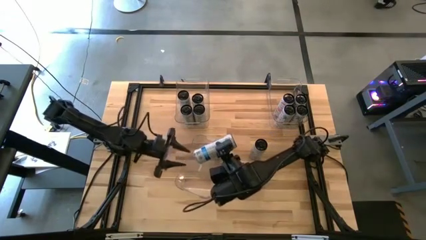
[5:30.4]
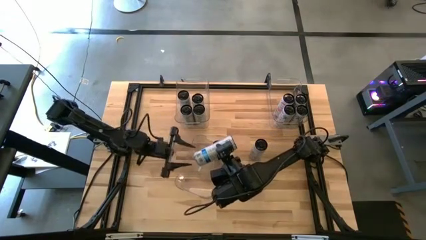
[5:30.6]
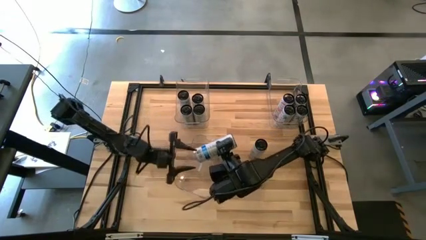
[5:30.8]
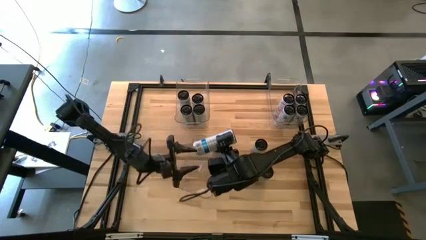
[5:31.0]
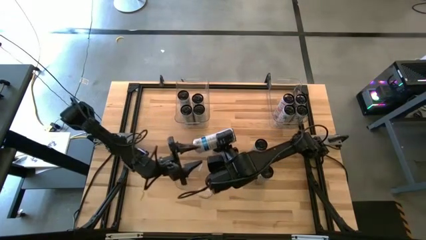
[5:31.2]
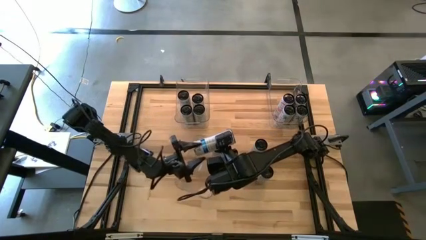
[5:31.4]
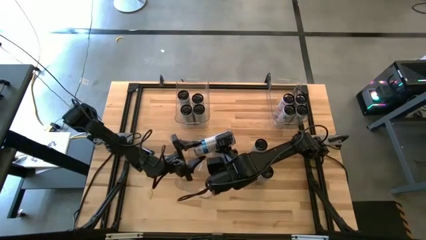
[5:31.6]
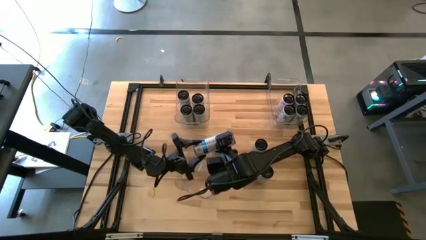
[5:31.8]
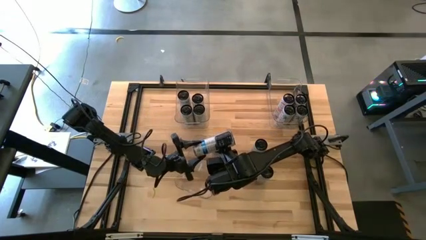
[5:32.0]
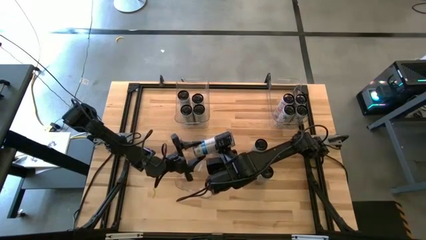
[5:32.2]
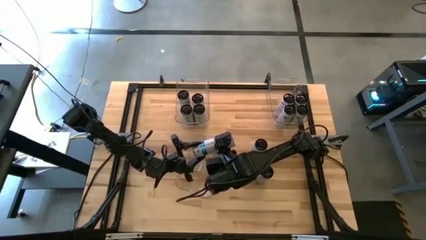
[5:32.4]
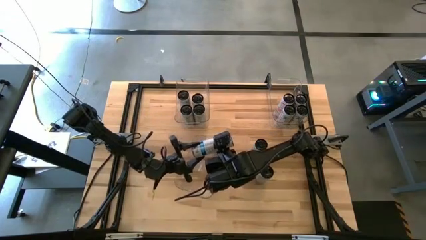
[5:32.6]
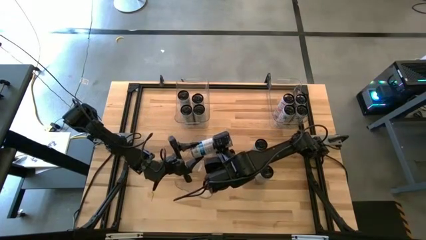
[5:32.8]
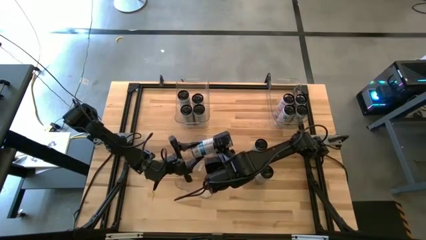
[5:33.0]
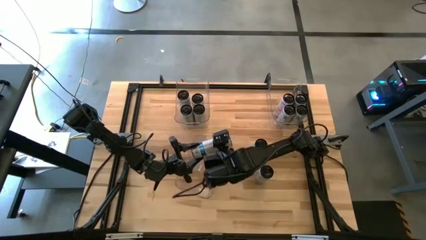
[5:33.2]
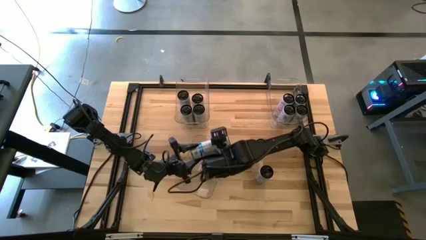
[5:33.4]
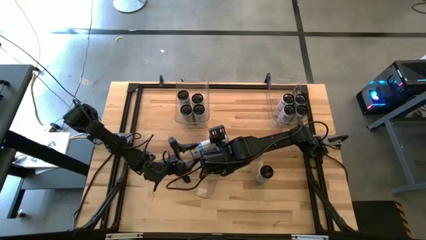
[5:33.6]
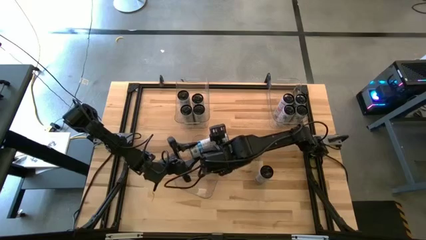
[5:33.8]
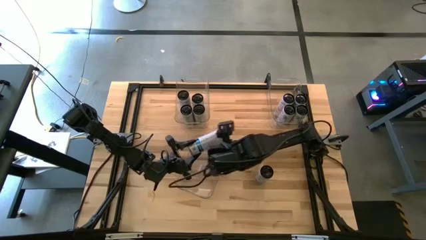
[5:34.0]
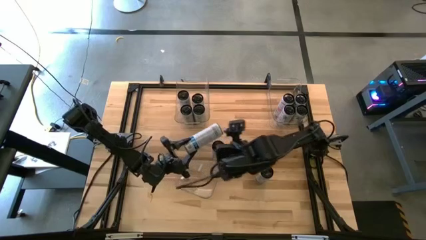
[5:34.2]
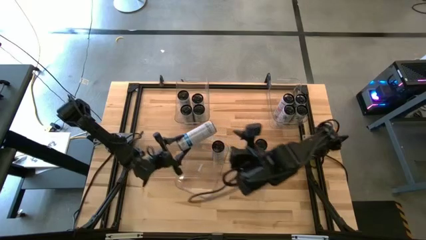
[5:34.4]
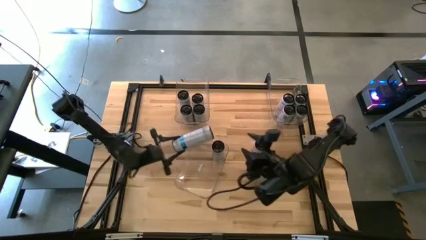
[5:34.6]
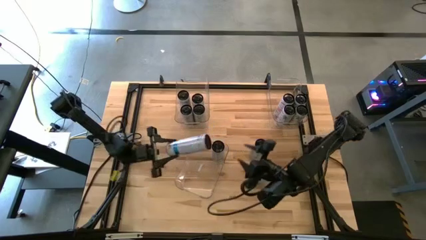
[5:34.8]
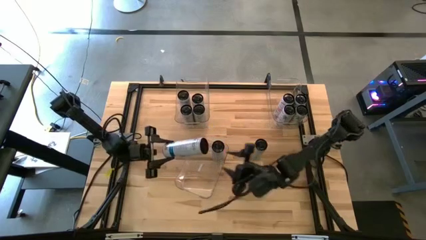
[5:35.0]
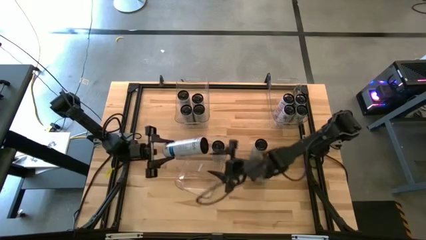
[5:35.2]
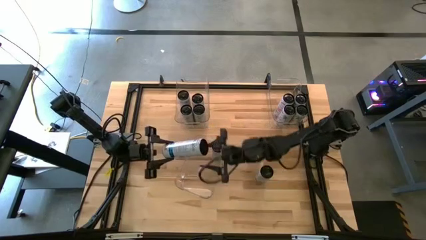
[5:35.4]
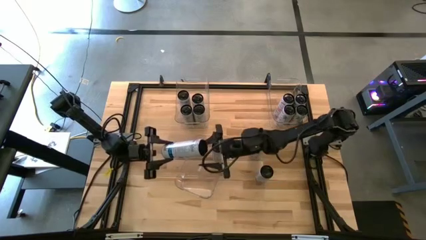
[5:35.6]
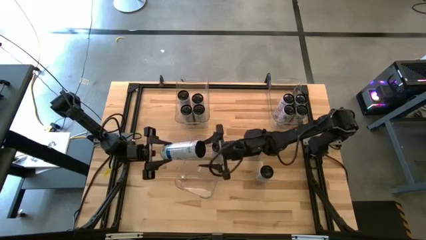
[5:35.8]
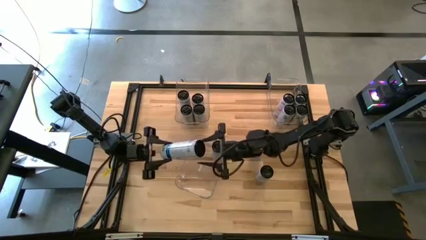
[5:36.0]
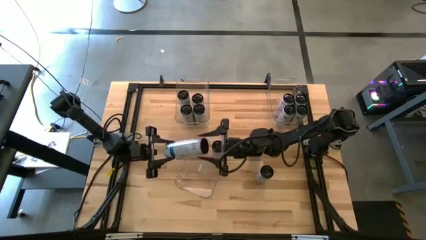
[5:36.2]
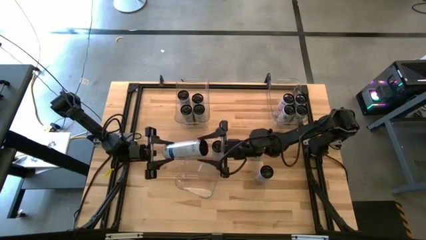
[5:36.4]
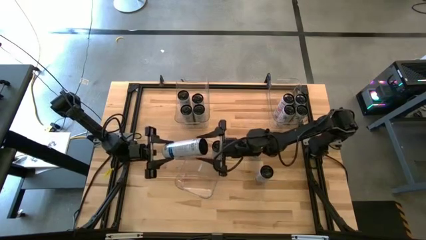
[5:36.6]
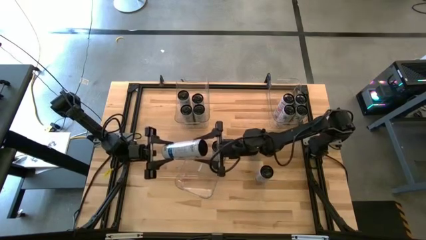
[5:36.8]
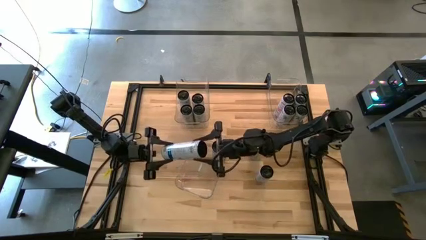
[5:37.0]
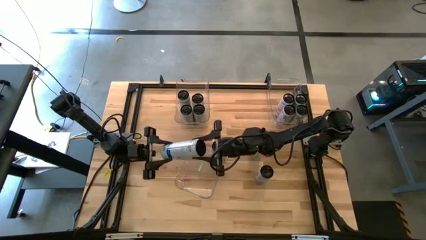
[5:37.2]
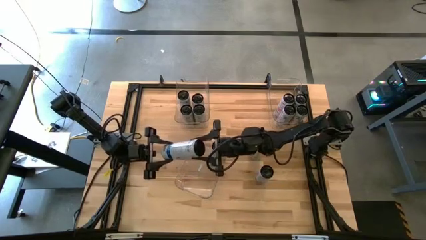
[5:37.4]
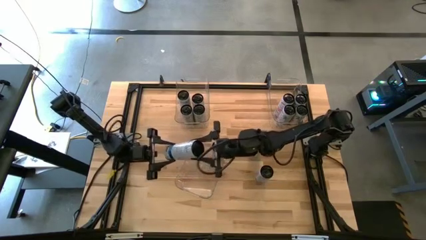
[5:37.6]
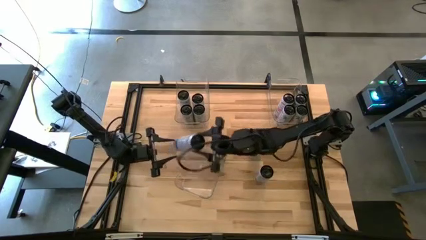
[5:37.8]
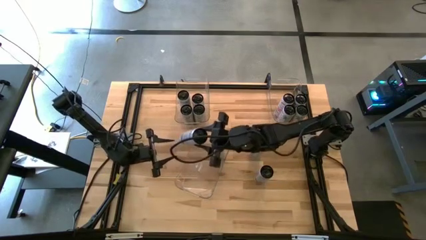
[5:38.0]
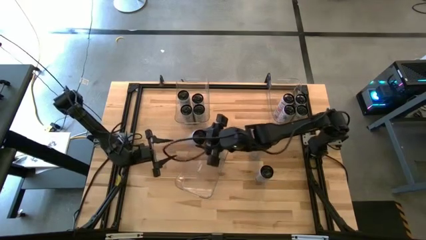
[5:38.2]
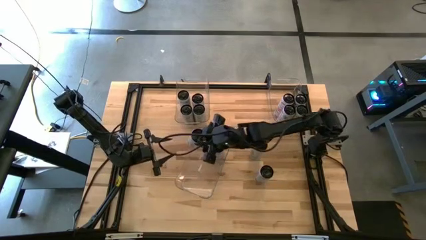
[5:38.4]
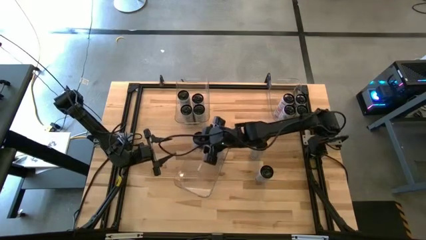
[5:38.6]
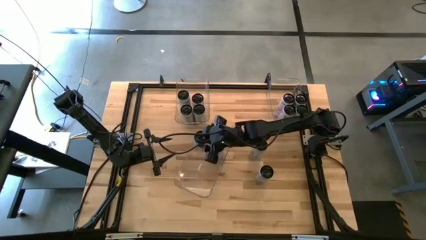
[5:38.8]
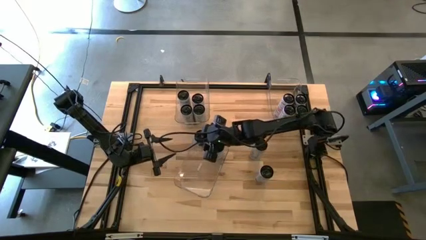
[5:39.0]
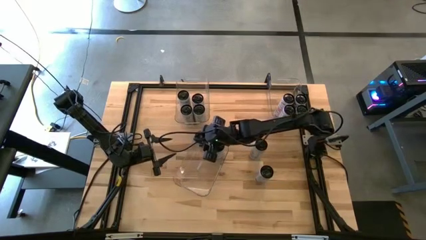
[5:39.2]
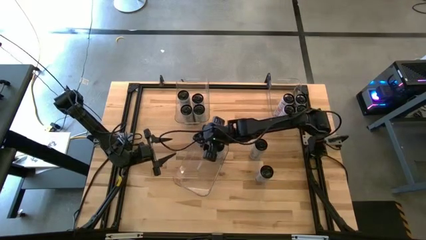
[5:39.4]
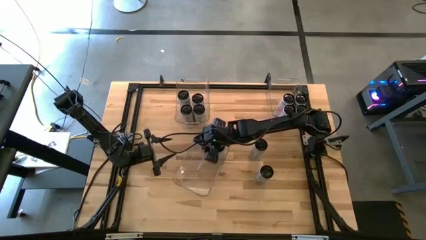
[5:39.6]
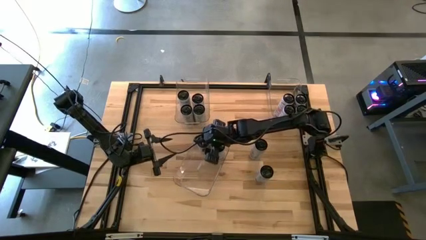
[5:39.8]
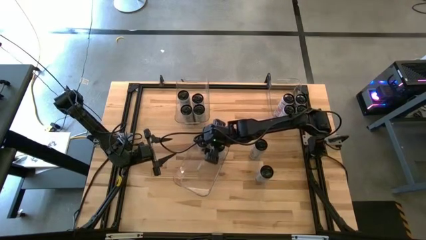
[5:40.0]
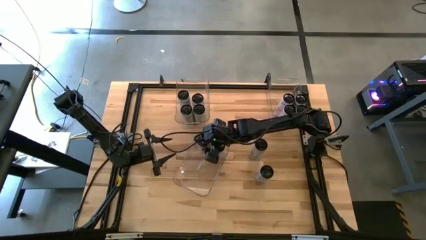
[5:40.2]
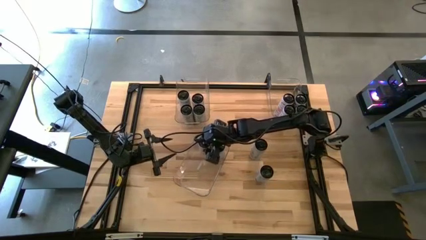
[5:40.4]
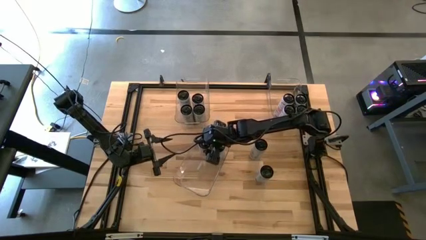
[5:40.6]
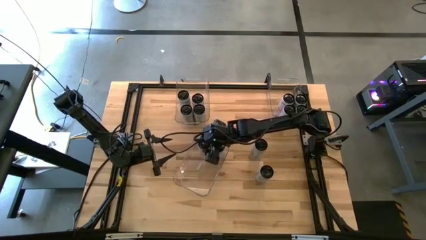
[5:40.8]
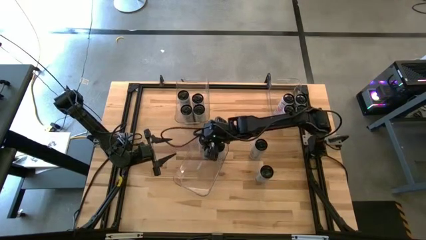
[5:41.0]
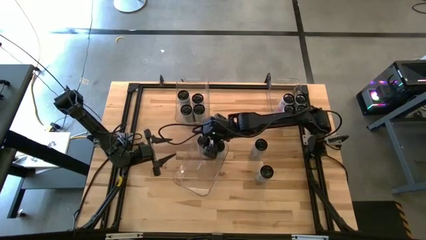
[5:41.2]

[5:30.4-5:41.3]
Task: Sort soda cans
Adjust the white/blue soda cans

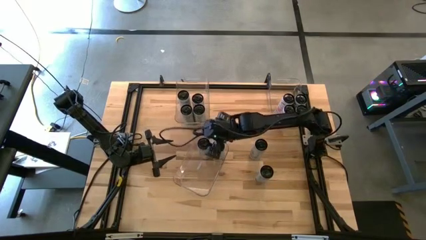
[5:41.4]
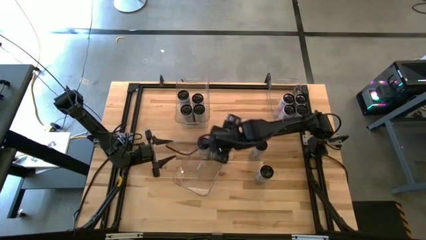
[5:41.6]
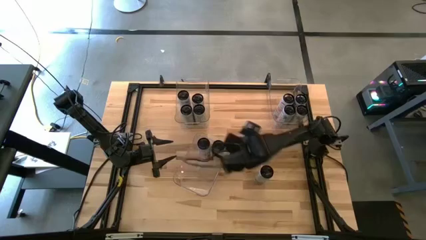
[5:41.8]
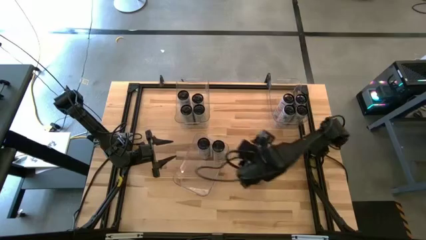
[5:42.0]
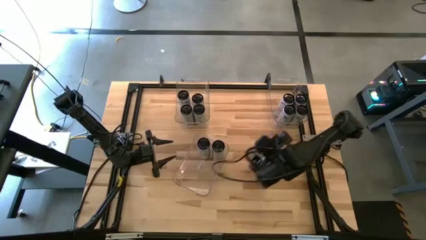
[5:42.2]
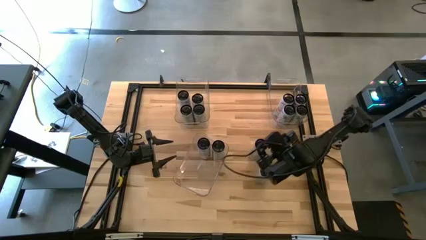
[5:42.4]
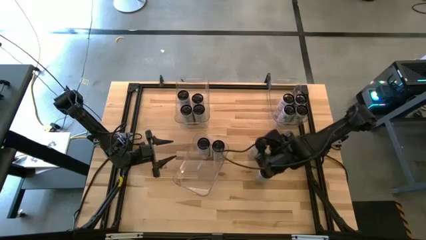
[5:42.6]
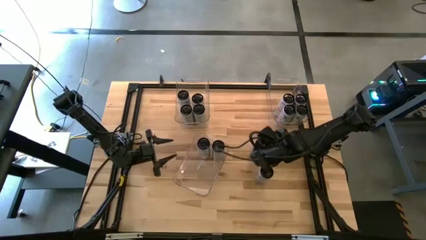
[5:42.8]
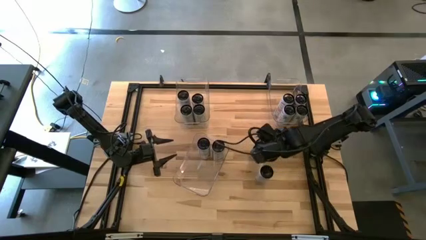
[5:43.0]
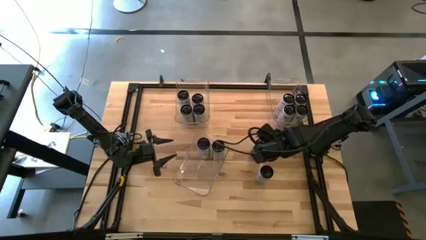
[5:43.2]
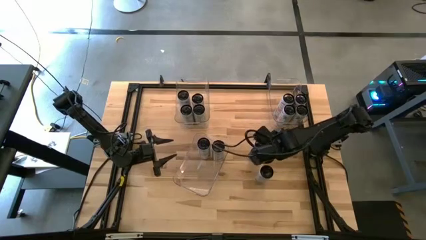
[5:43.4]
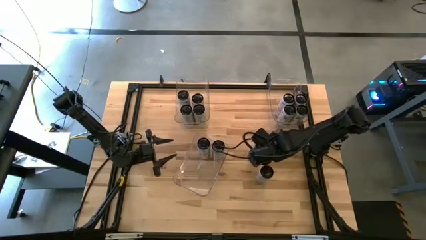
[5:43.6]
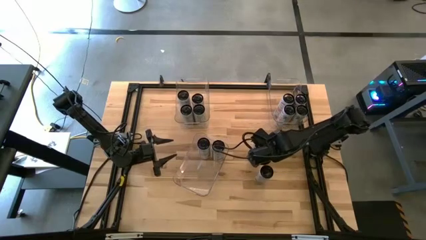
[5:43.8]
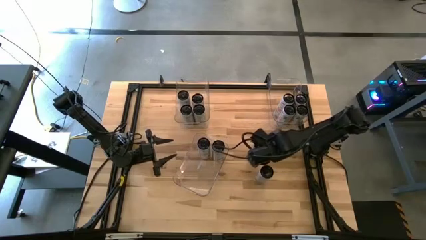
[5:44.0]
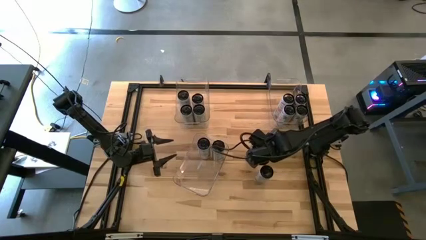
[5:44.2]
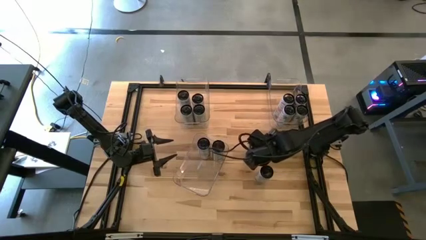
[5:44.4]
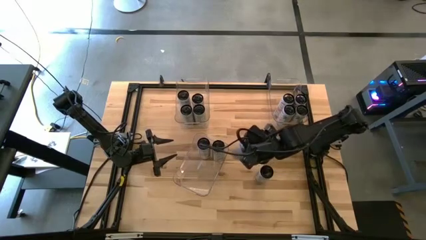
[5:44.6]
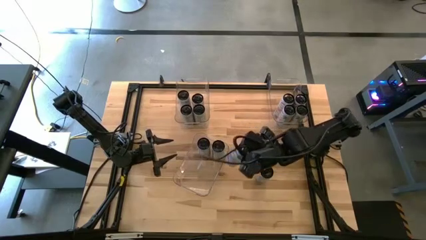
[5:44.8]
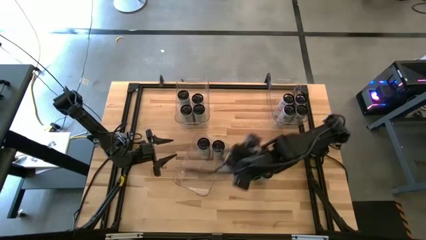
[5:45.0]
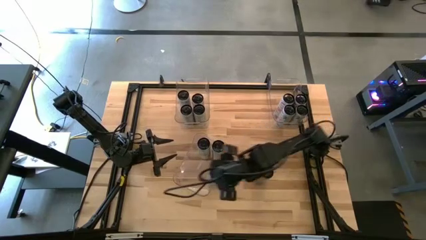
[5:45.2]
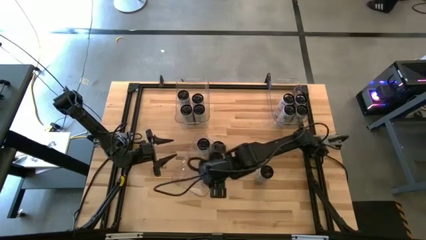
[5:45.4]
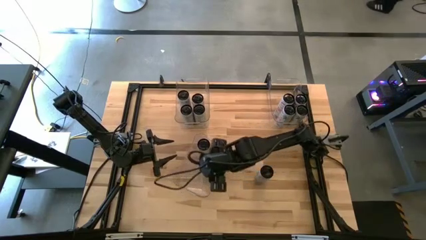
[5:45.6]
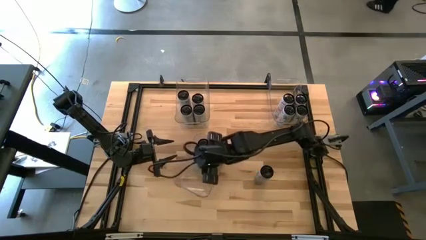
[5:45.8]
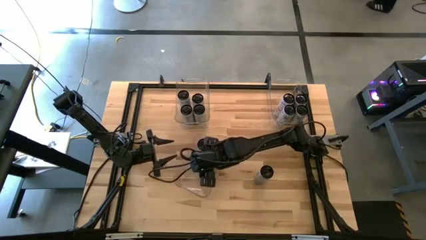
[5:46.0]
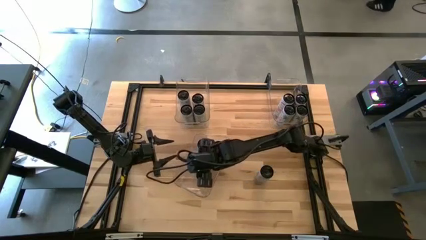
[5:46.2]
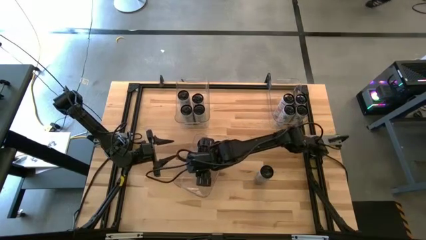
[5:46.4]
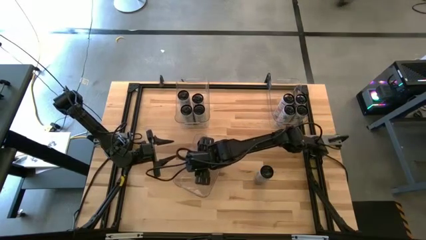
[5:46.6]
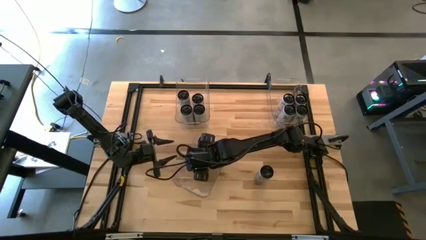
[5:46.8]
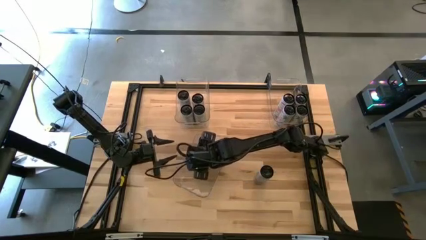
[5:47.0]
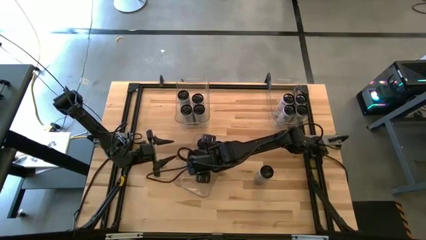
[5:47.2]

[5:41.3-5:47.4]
Put the white/blue soda can into the bottom center transparent bin
